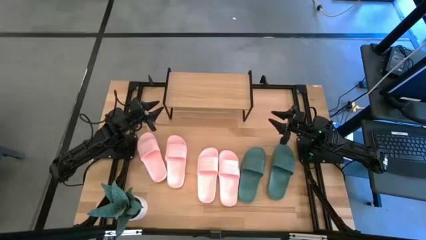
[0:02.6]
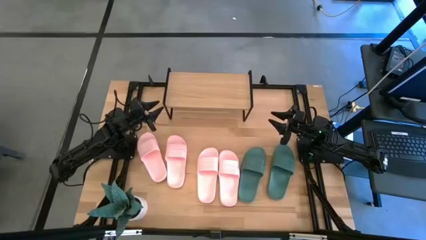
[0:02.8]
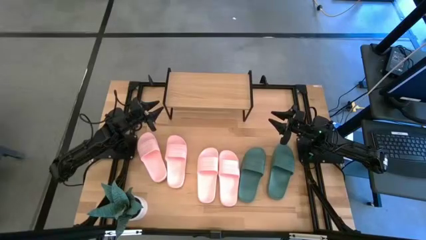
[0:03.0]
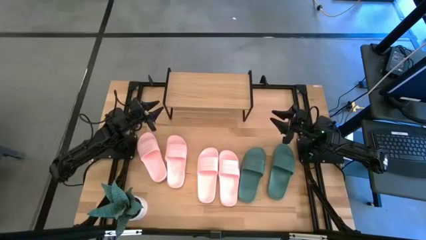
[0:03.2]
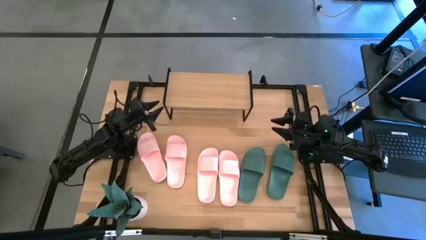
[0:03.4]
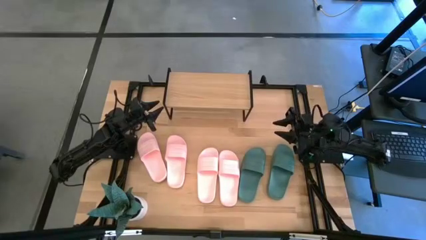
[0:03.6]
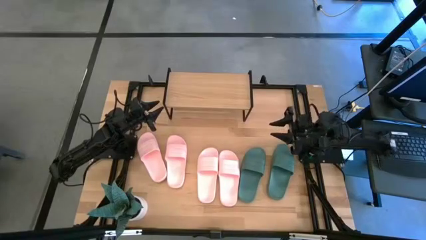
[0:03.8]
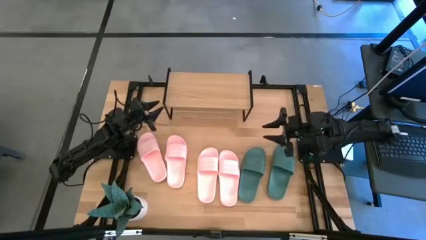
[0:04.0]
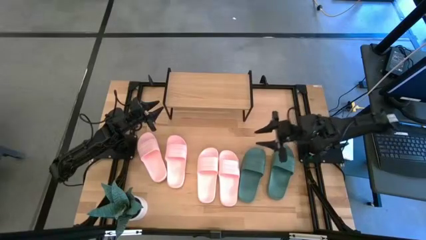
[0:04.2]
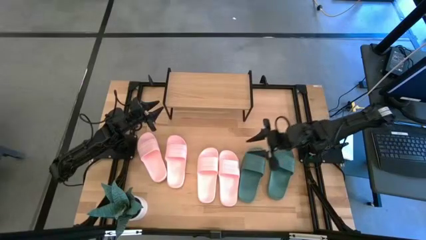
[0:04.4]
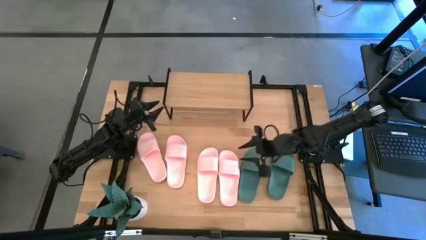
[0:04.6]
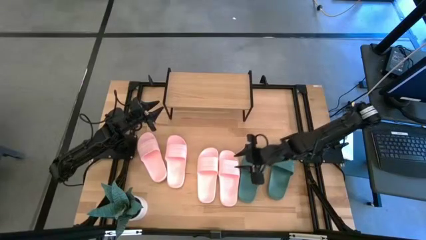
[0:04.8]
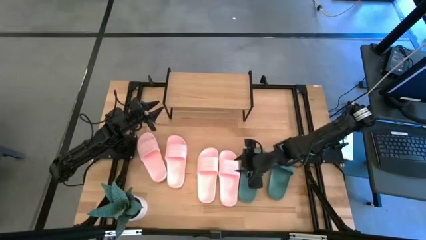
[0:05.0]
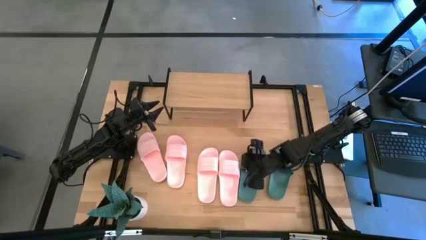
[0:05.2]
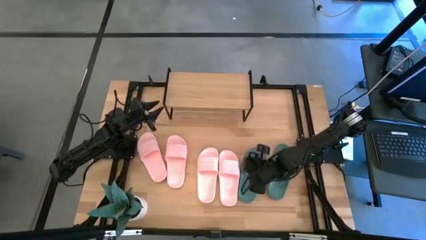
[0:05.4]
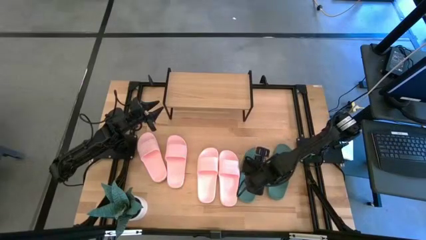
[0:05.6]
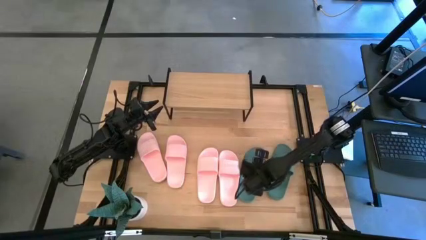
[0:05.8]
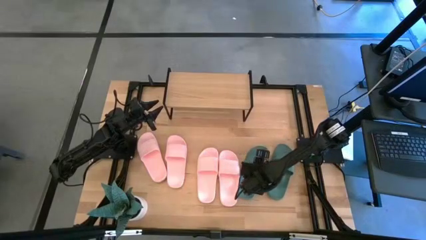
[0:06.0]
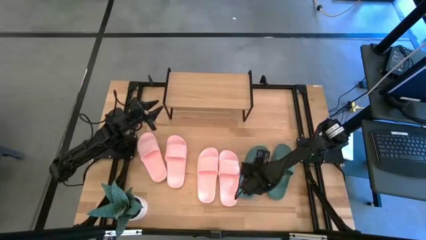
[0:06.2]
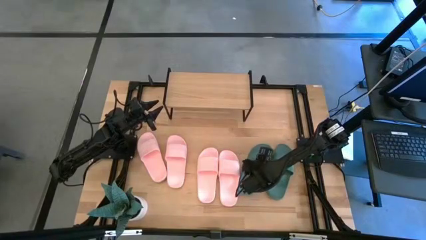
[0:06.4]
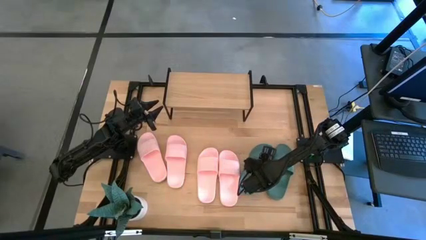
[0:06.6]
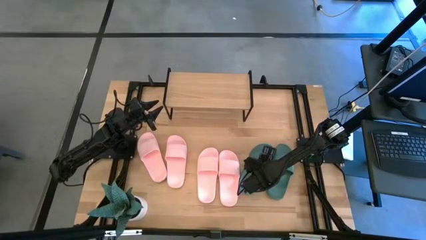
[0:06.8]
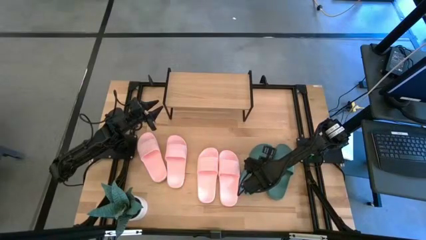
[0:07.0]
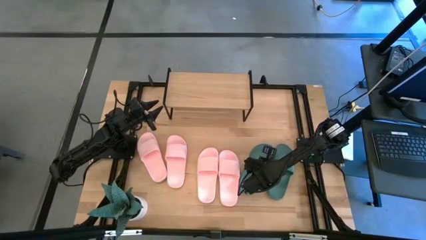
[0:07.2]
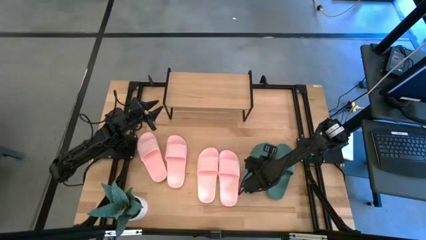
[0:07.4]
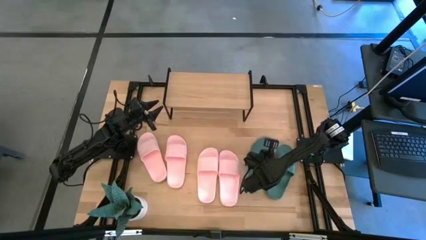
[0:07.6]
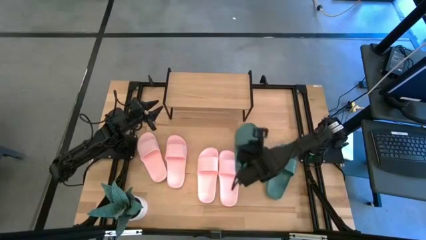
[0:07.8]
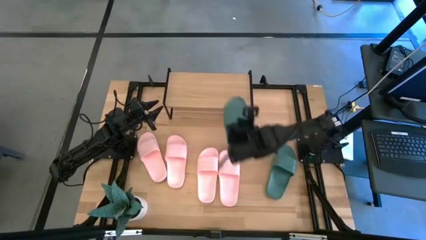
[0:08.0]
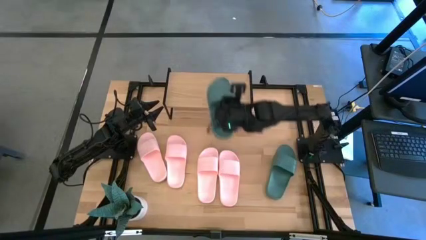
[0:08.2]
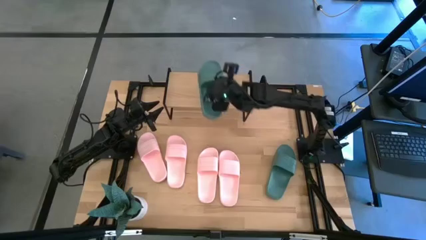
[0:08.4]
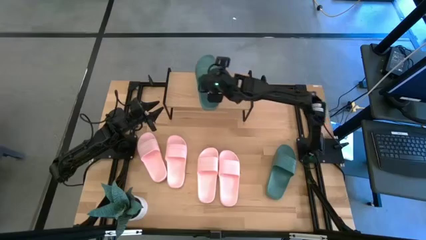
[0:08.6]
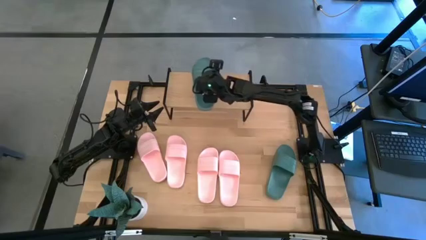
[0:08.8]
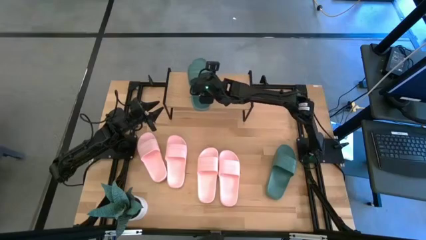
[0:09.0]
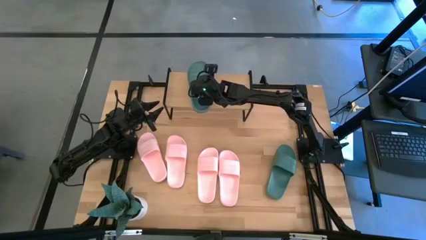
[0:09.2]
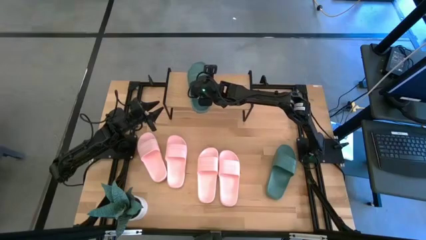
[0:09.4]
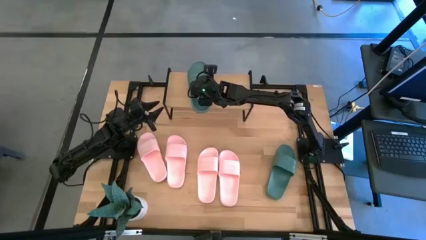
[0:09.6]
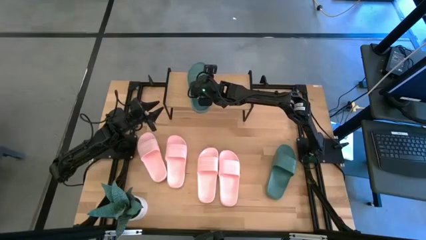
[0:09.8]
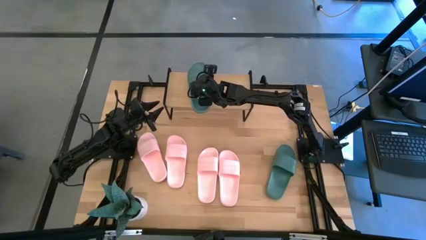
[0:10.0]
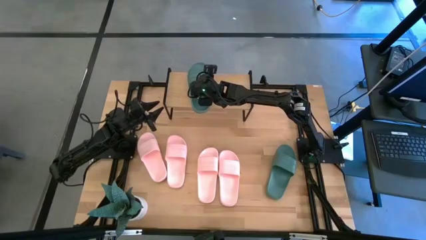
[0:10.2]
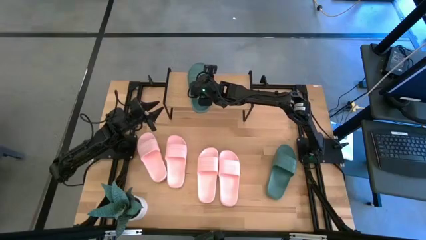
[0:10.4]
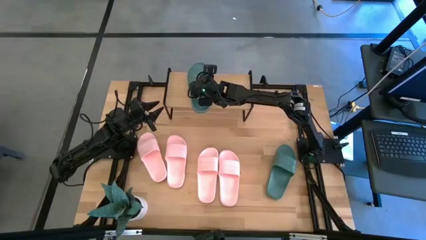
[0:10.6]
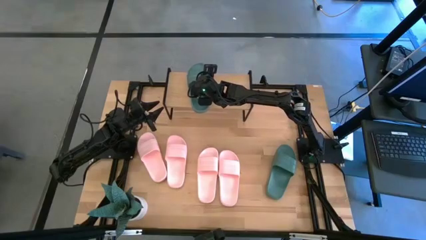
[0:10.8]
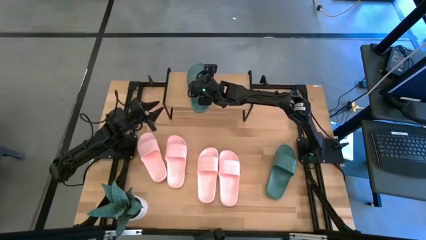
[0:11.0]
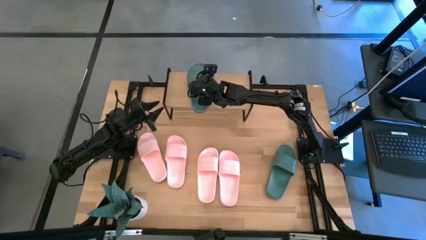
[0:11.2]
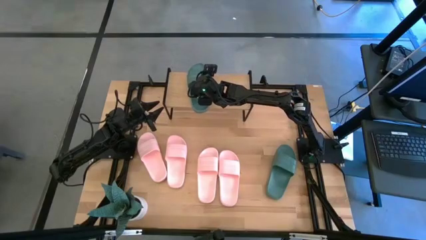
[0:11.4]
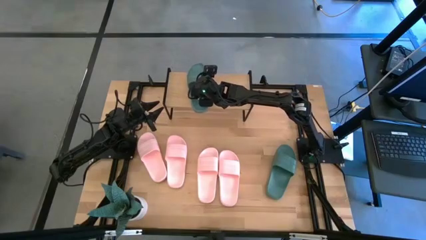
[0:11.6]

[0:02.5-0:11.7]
Task: Pick and place slides into the shelf
Put the left green slipper on the shelf

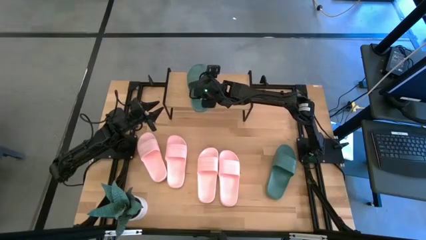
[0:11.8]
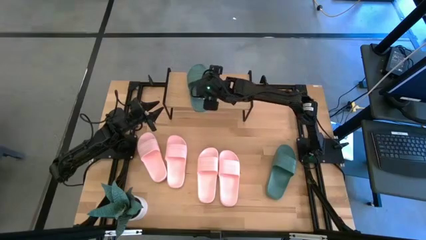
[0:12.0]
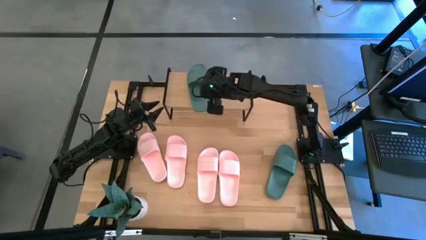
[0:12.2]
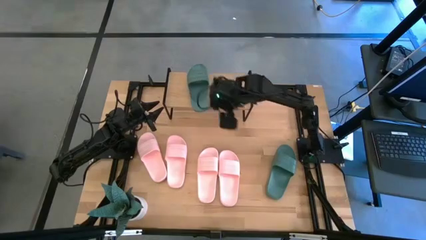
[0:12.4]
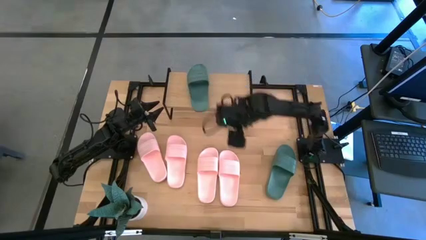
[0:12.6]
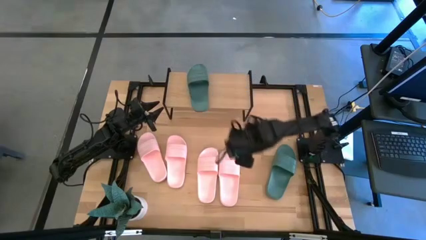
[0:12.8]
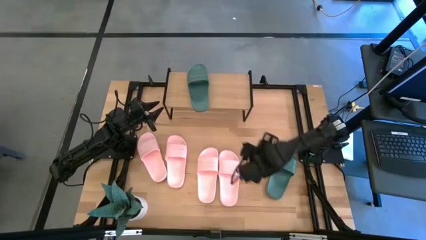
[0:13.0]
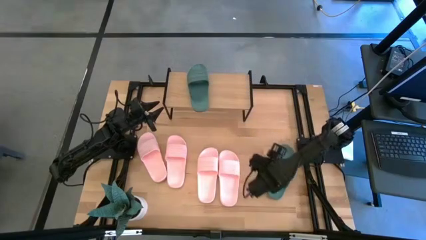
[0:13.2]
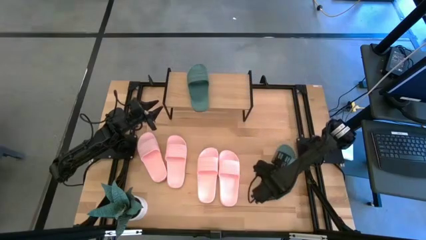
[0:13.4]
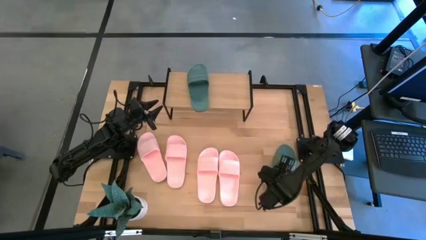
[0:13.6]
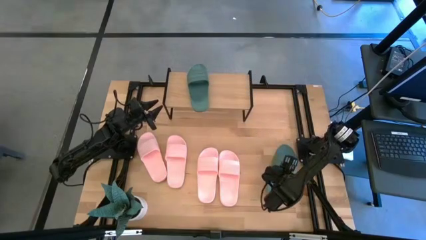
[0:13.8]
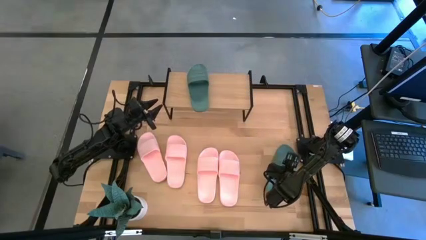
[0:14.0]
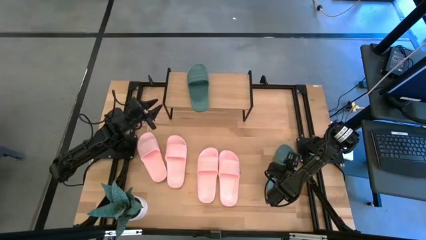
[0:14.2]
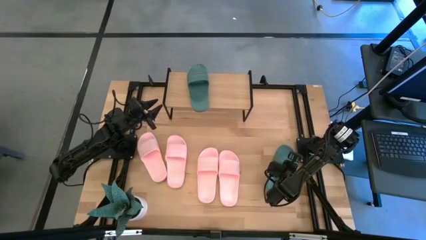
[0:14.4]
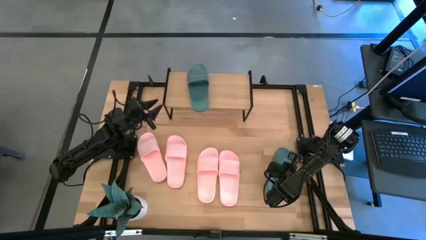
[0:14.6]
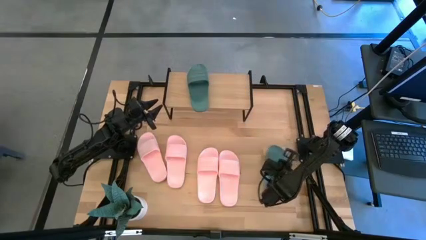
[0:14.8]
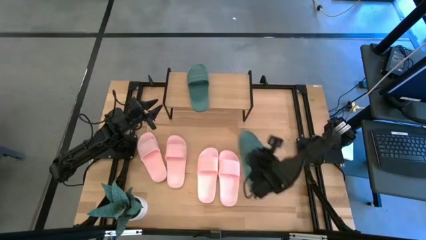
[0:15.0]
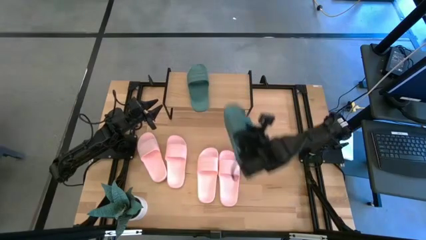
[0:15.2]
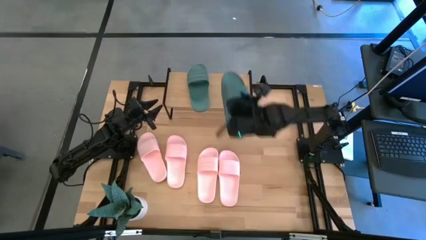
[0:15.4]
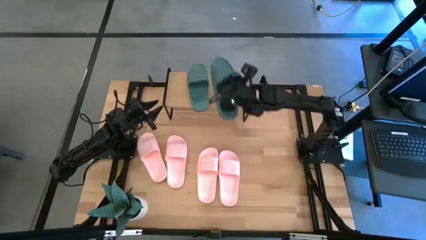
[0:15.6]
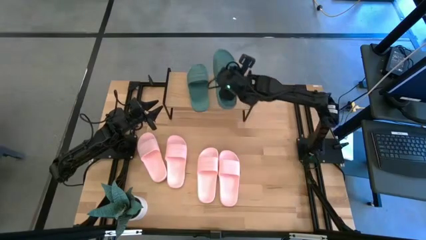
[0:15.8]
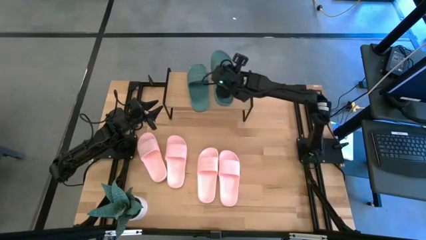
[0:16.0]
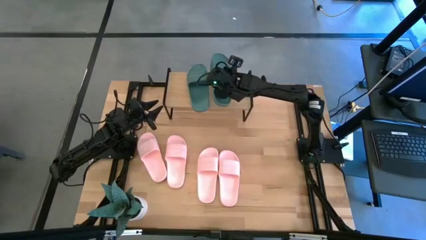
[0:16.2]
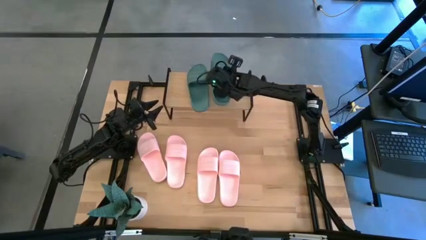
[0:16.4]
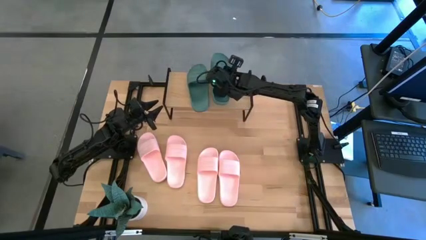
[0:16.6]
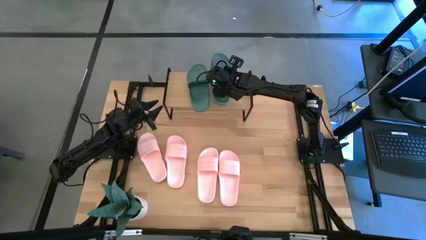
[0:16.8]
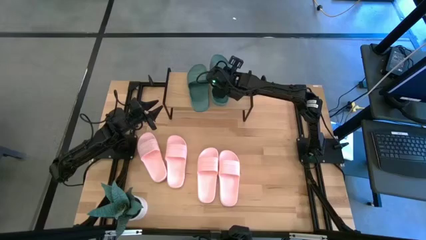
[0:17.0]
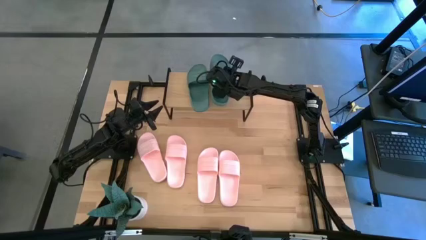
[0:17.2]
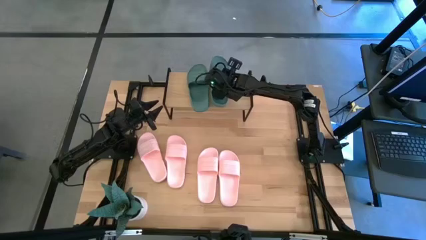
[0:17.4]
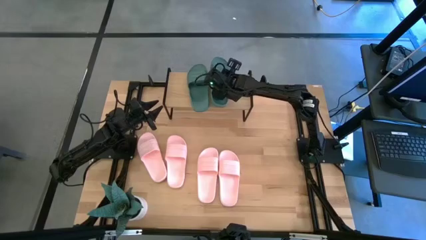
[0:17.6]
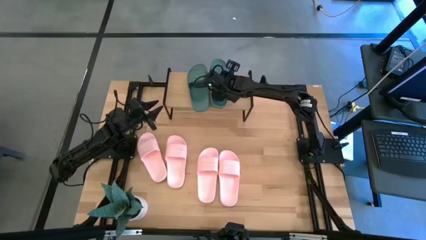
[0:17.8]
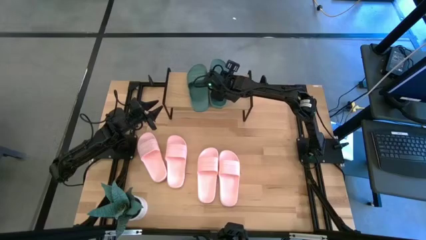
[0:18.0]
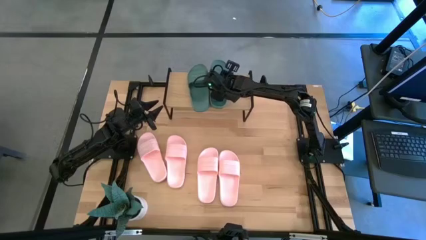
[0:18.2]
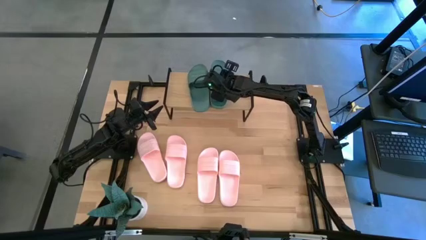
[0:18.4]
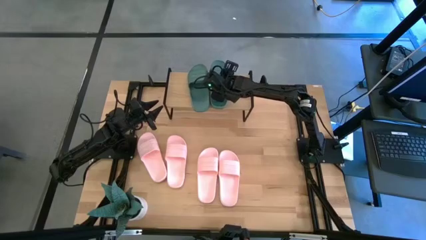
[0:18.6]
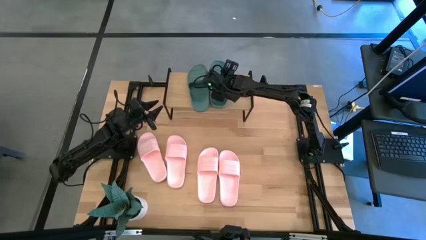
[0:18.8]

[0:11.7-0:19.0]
Put the green slipper on the shelf
